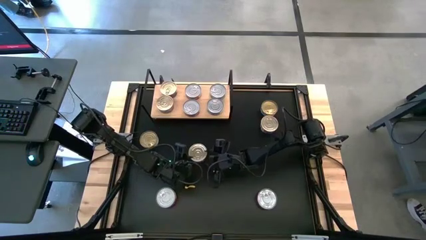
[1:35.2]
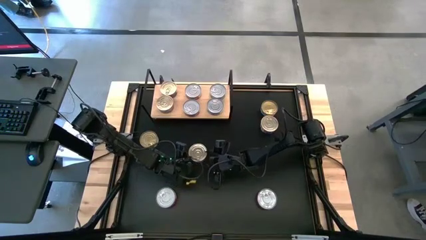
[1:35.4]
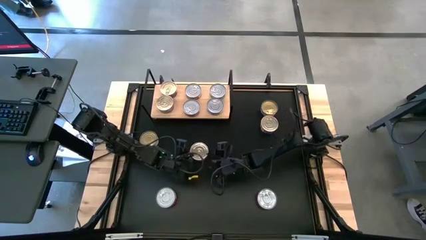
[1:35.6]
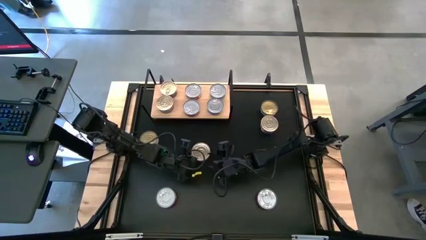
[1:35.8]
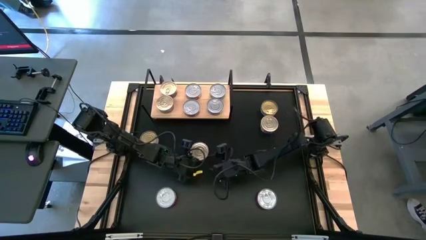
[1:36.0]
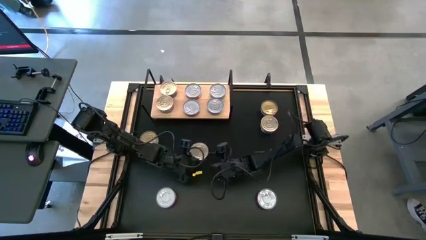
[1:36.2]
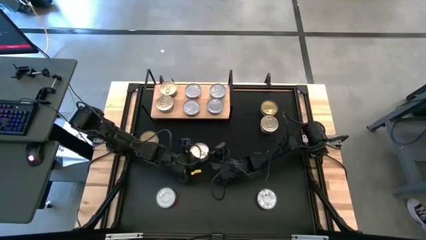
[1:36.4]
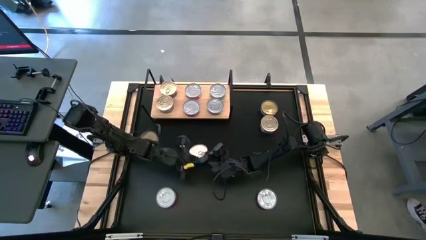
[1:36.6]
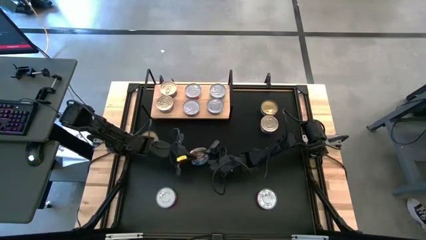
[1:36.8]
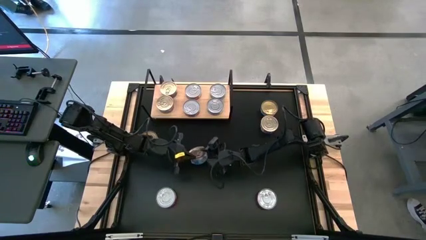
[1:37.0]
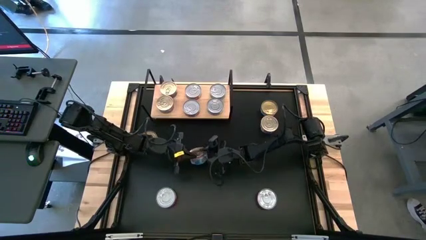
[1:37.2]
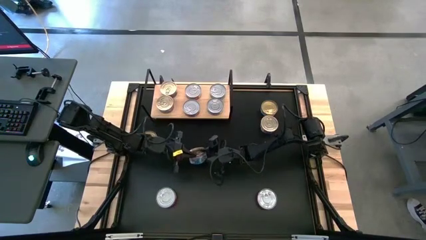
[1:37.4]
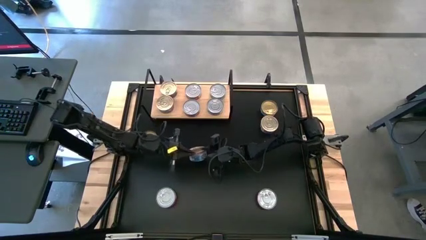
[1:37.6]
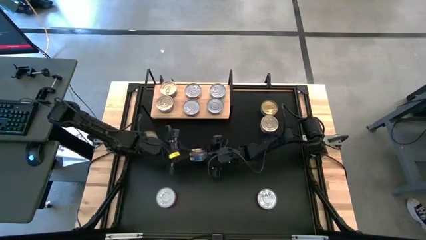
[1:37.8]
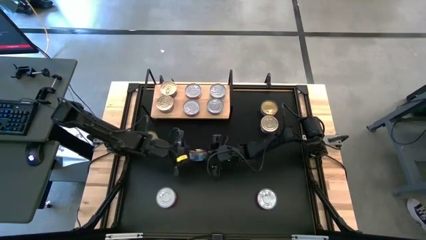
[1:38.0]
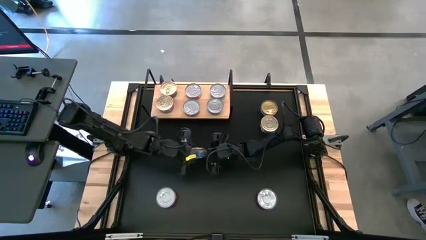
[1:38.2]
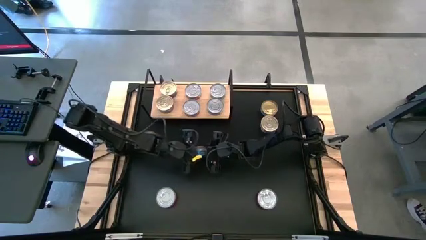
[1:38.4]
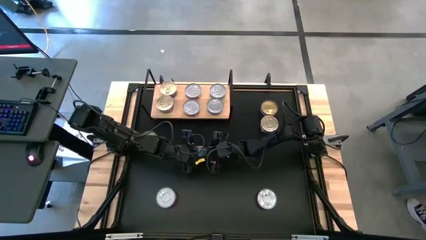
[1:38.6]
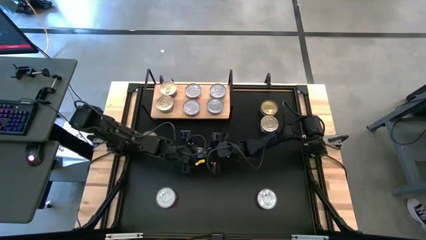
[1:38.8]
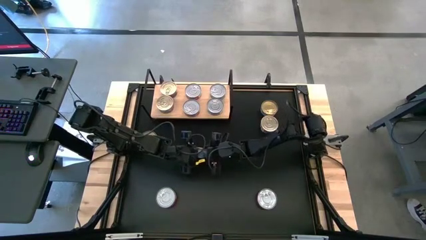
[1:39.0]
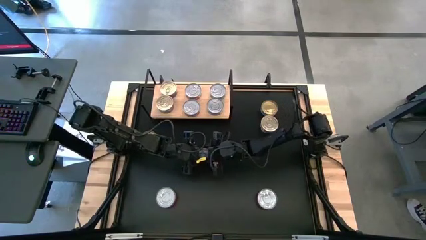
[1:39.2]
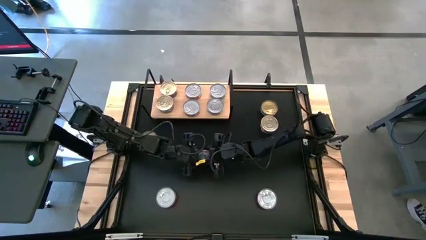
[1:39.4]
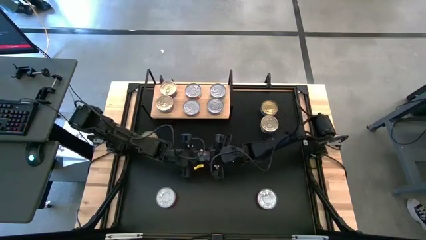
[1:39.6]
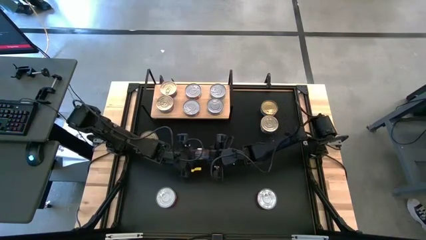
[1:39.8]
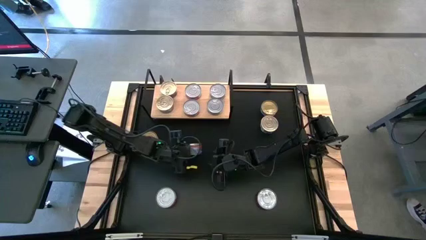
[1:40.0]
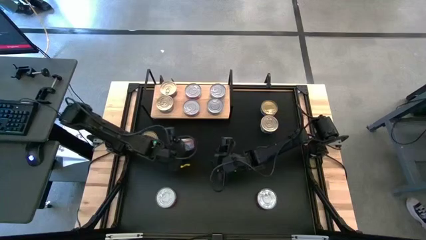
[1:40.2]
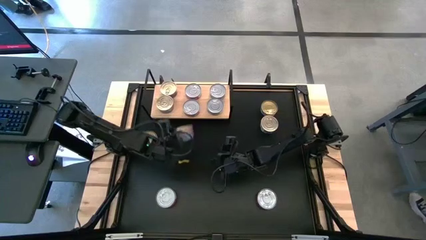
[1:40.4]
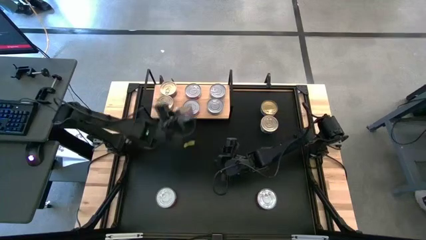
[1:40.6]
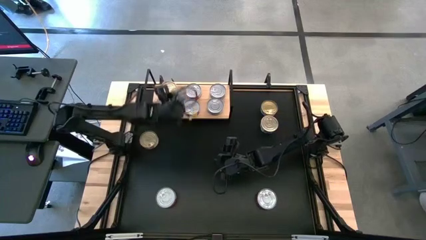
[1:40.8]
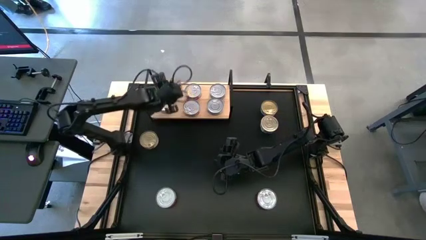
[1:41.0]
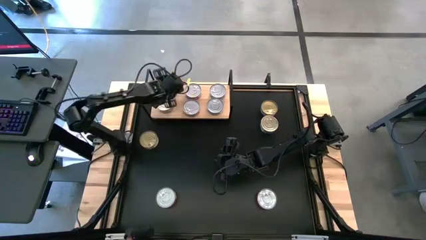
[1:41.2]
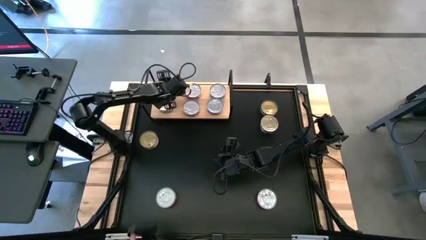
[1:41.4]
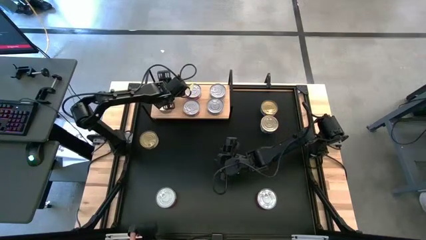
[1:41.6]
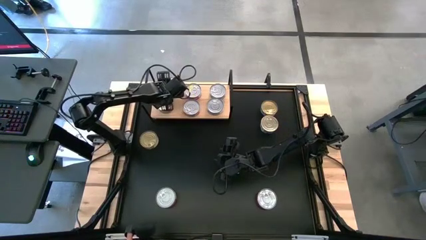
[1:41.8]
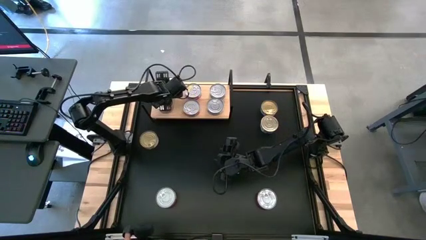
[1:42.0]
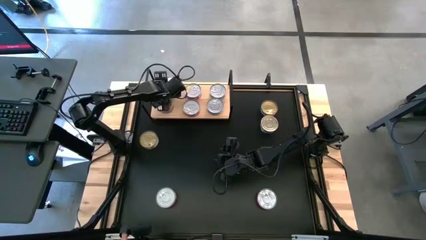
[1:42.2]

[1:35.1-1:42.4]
Task: Stack canned seafood by type on shelf
Stack the bottom blue tuna can on top of the blue tuna can on the shelf

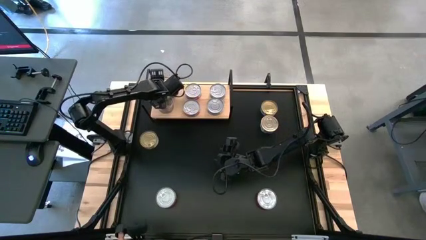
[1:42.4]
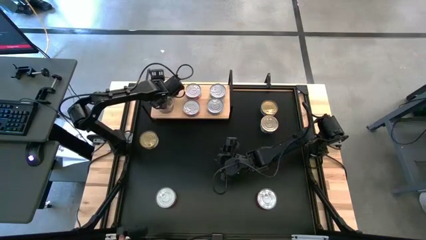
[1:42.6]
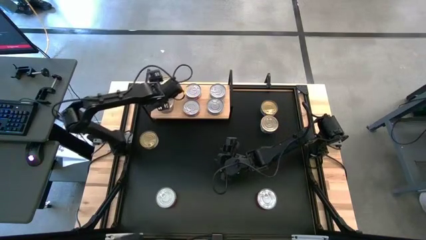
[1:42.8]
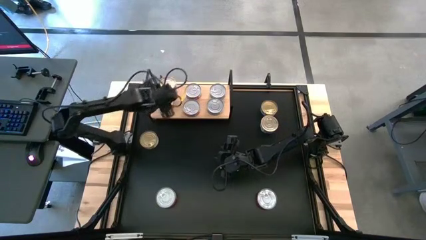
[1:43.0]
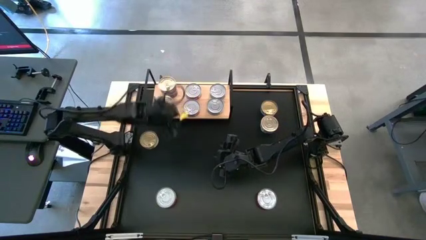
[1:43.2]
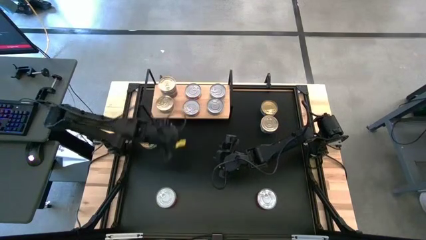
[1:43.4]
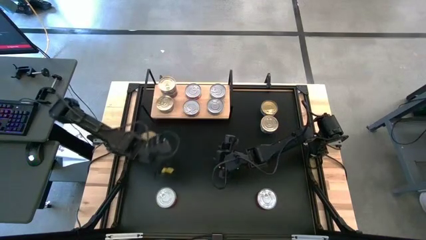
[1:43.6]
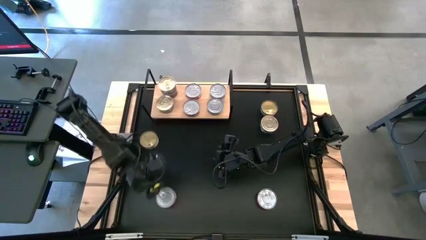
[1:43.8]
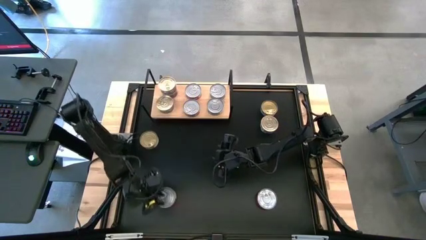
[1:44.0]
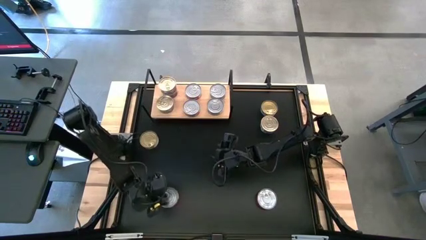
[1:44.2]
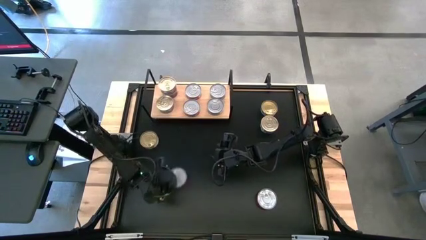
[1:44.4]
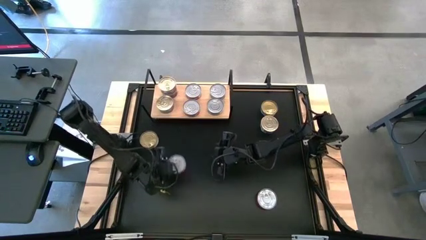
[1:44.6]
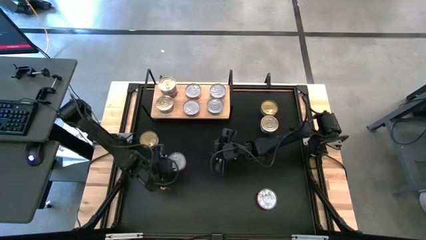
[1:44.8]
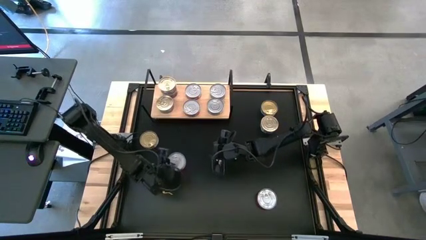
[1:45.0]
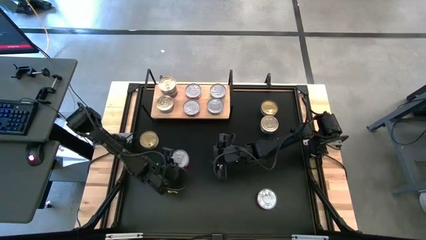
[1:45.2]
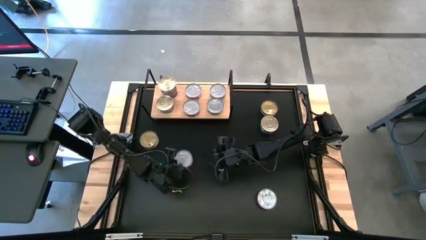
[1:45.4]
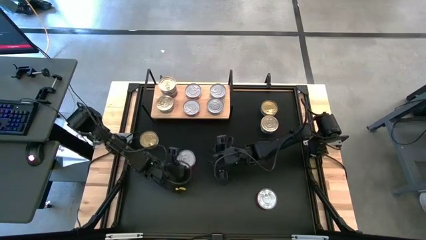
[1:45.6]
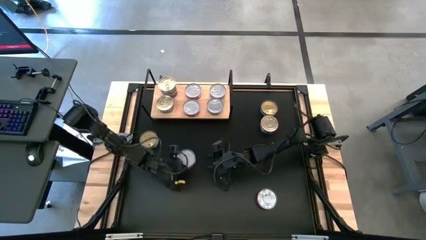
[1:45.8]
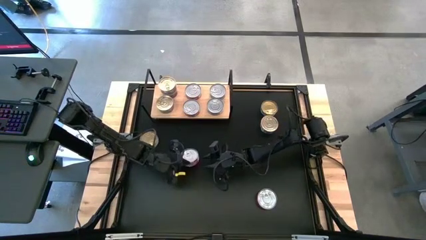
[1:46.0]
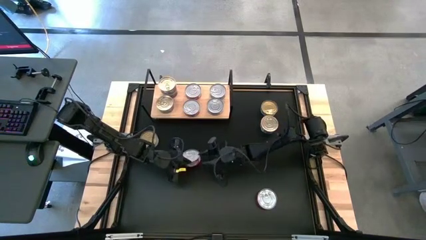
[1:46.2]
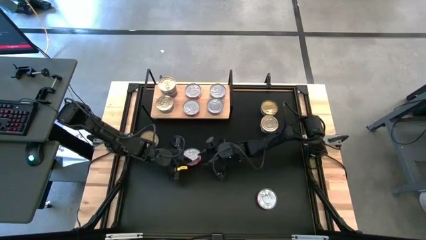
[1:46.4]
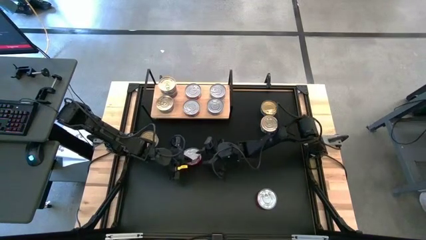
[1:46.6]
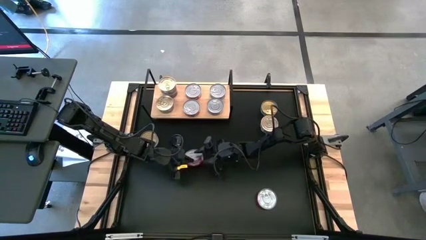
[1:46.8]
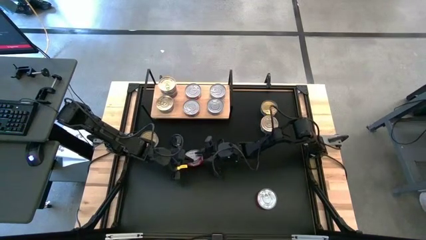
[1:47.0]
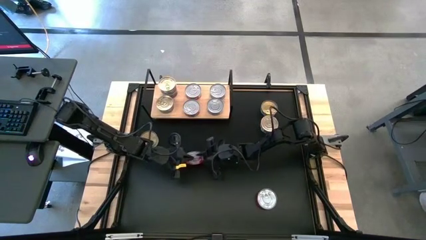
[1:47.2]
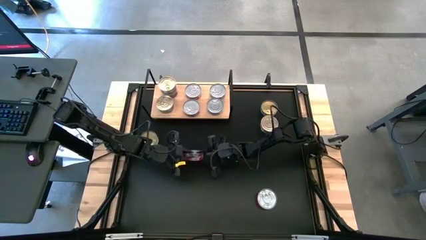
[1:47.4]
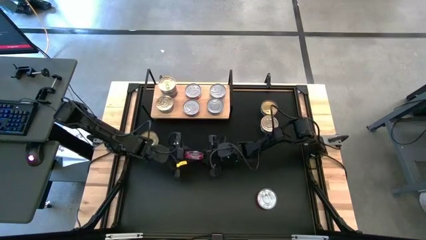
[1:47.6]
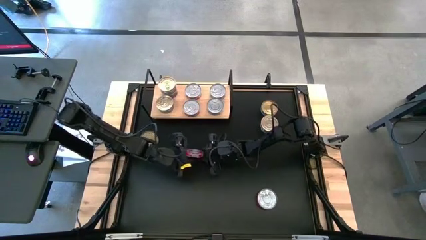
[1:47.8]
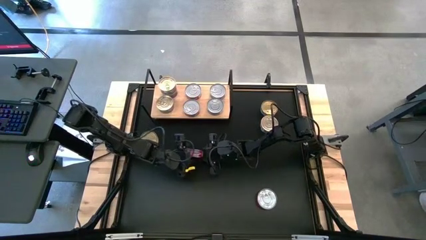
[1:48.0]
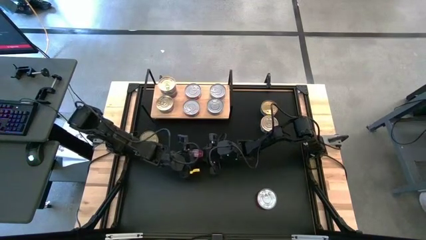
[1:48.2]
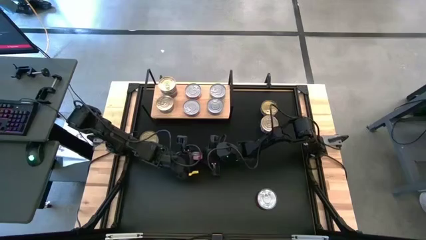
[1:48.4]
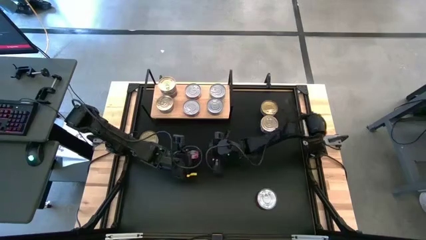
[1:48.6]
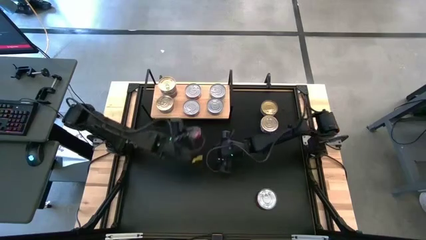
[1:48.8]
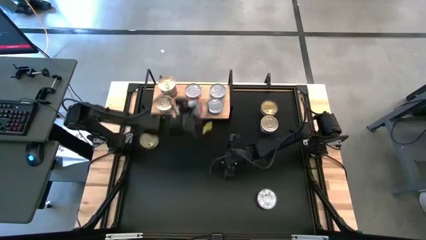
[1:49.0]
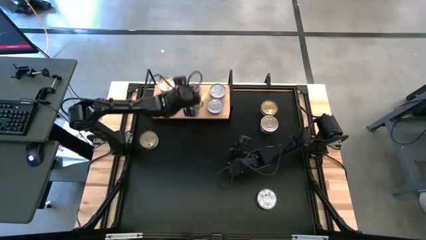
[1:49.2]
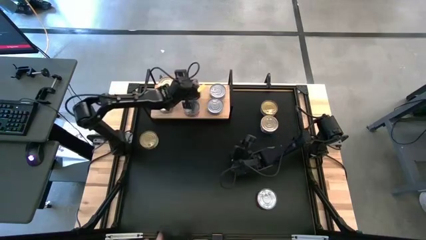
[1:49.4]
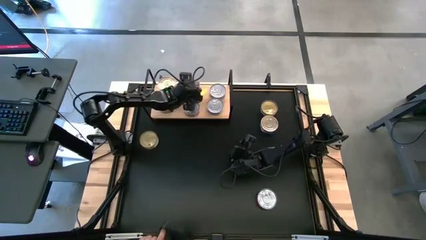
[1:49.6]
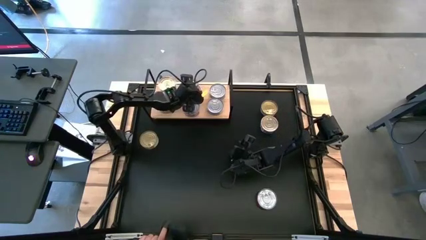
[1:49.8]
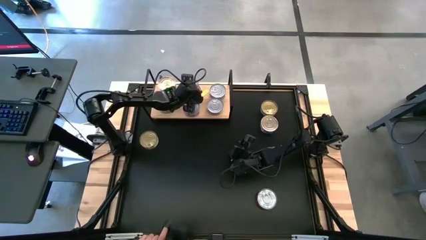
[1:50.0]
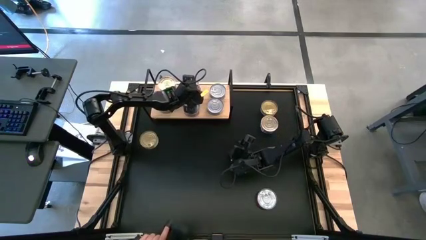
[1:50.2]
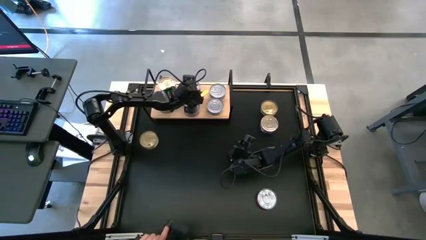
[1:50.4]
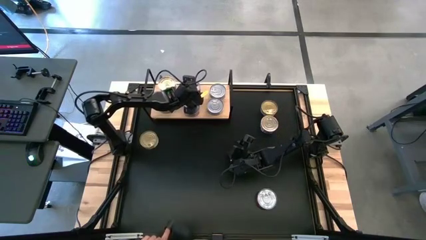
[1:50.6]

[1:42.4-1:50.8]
Stack the left red tuna can on top of the red tuna can on the shelf

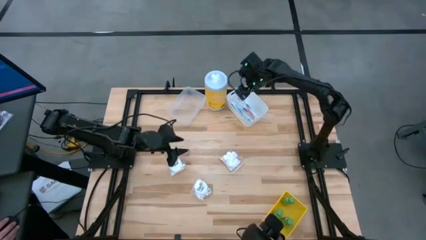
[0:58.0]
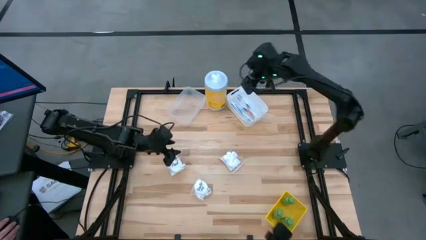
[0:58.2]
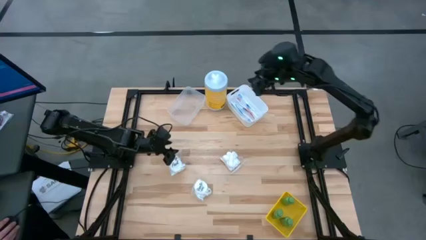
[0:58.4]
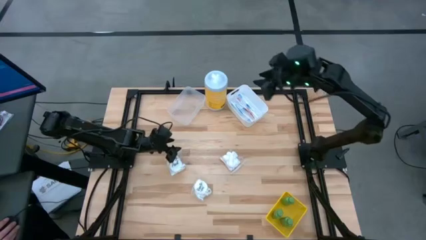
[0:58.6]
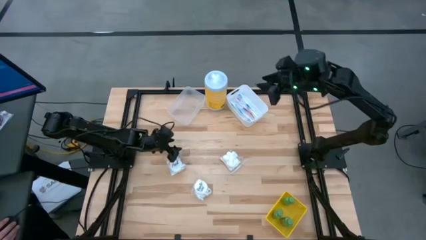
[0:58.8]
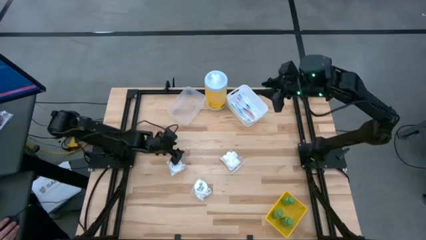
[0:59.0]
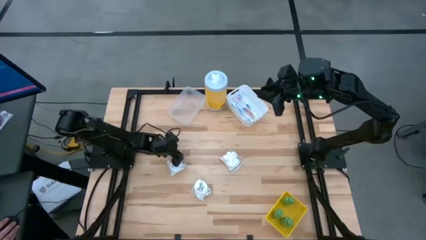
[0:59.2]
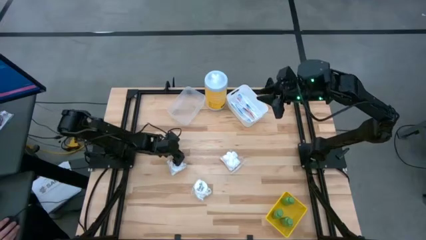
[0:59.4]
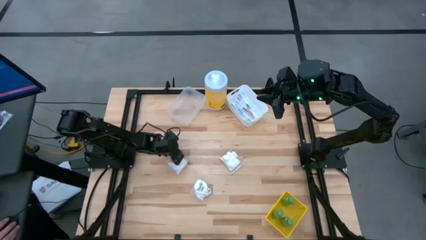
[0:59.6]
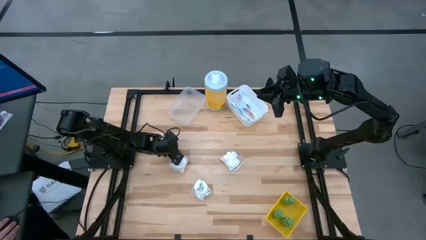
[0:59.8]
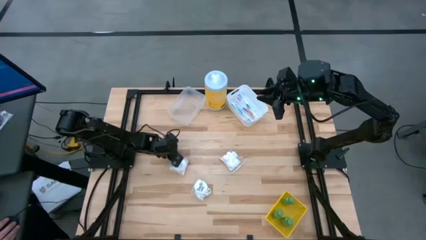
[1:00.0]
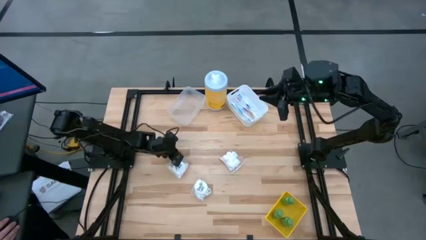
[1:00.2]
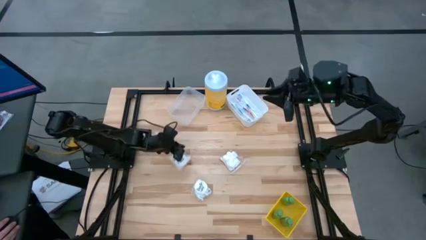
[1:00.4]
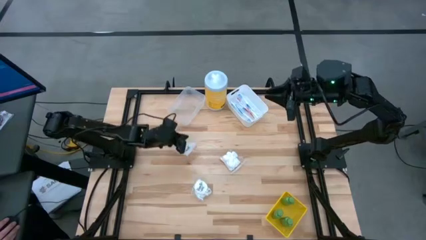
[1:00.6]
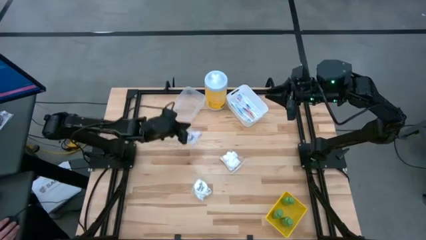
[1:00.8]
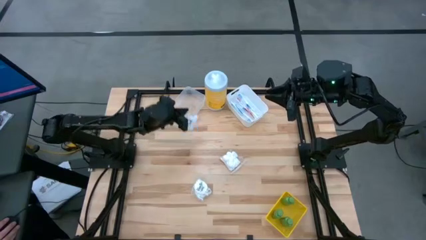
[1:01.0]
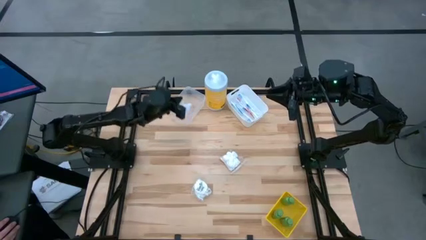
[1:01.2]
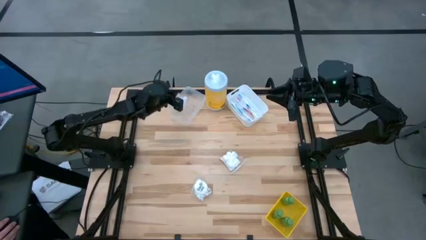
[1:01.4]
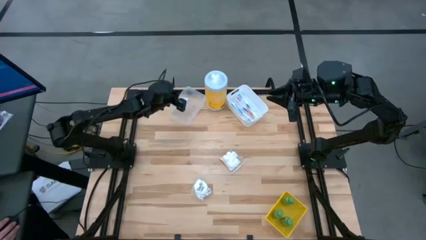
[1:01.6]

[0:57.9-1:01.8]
Task: Pick & Place Travel size toiletries
Put the top left cotton pack into the transparent bin
